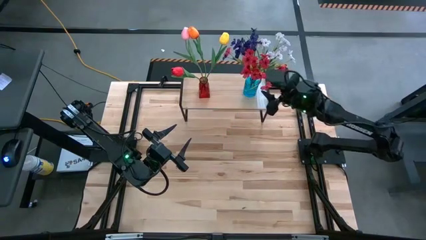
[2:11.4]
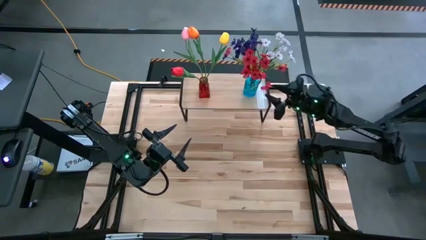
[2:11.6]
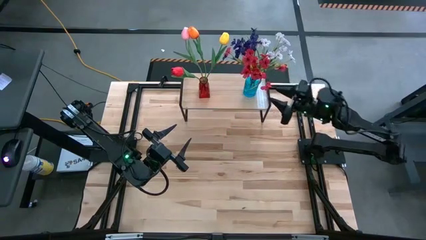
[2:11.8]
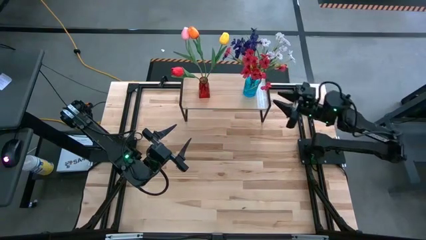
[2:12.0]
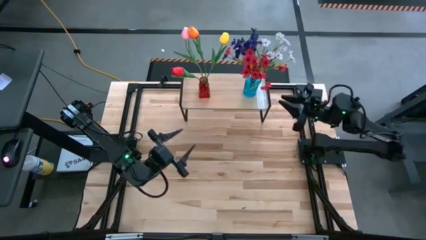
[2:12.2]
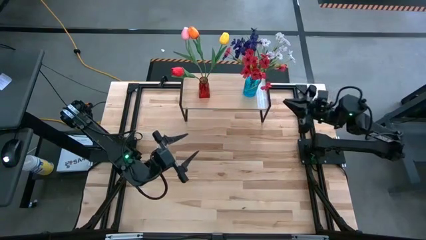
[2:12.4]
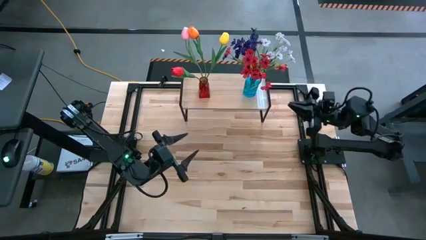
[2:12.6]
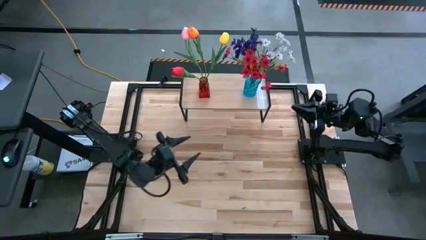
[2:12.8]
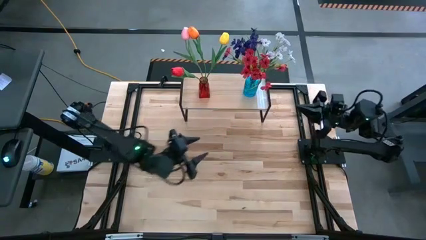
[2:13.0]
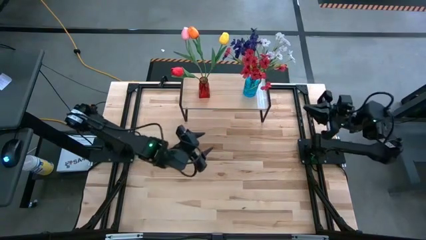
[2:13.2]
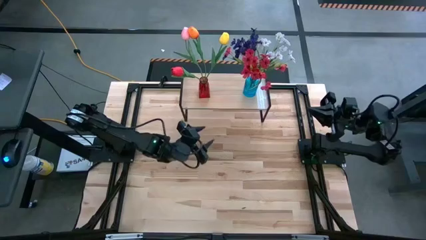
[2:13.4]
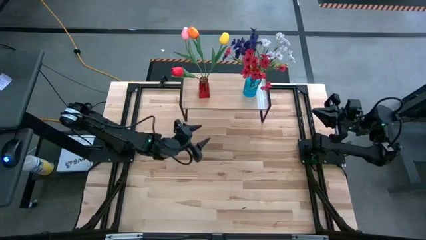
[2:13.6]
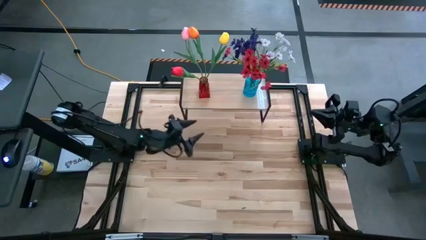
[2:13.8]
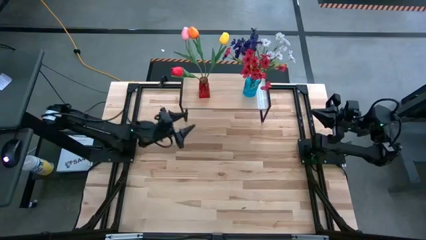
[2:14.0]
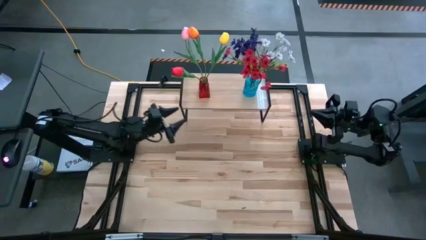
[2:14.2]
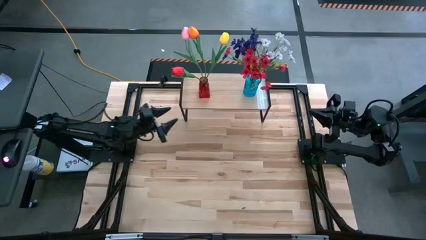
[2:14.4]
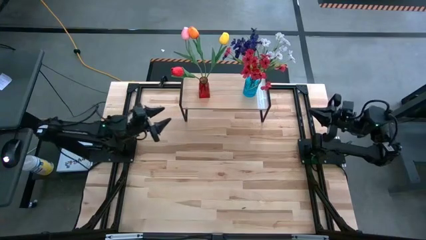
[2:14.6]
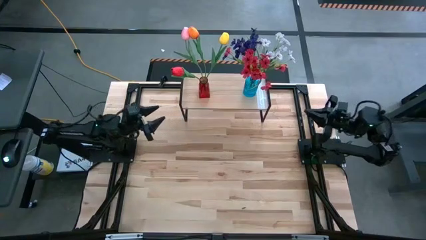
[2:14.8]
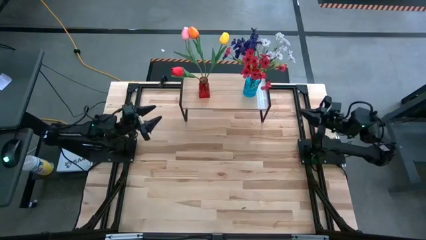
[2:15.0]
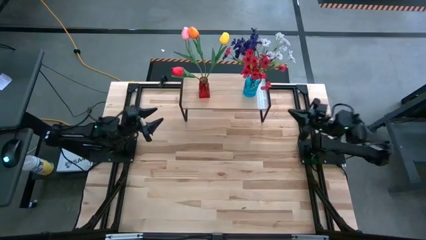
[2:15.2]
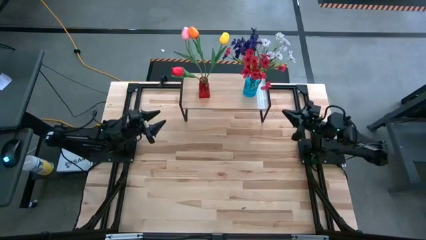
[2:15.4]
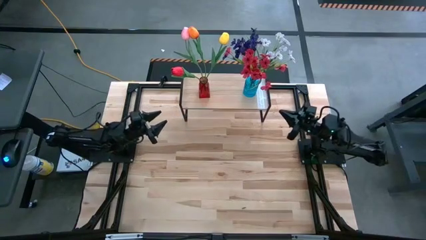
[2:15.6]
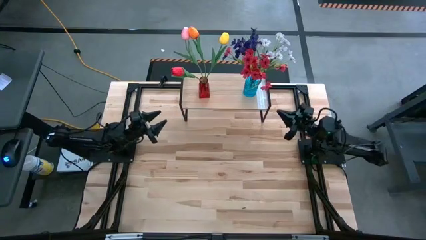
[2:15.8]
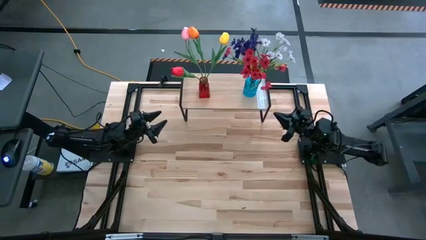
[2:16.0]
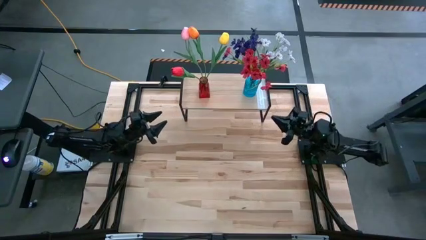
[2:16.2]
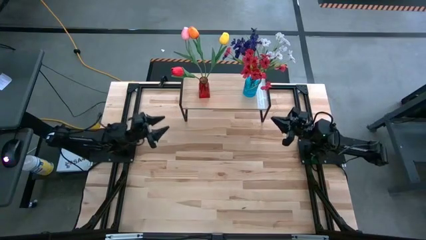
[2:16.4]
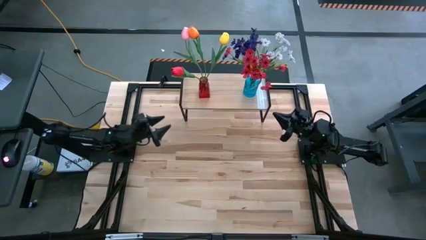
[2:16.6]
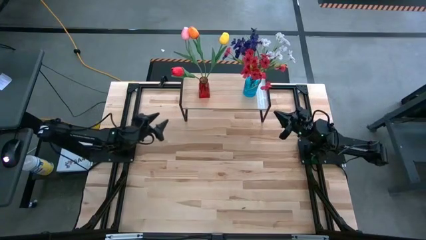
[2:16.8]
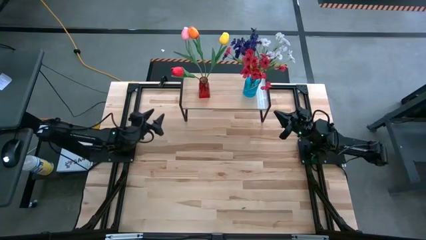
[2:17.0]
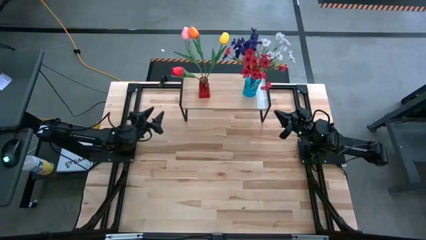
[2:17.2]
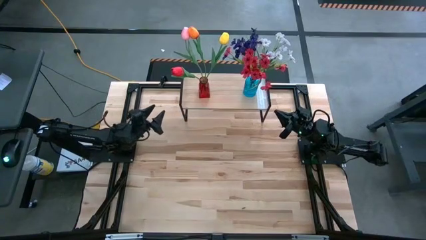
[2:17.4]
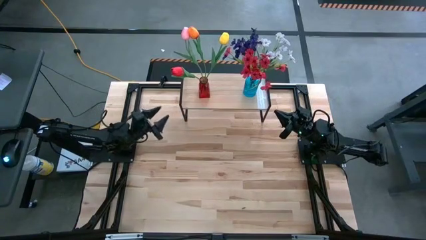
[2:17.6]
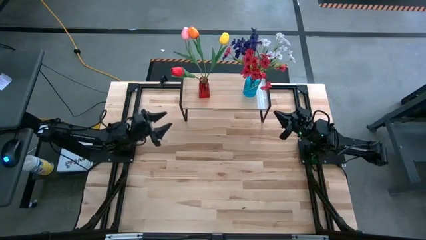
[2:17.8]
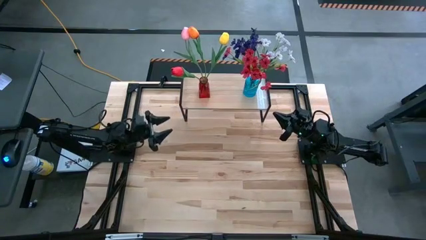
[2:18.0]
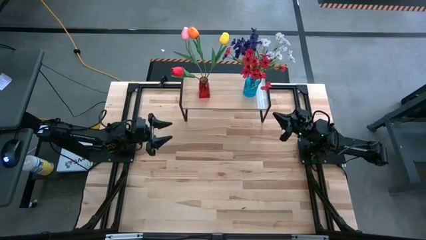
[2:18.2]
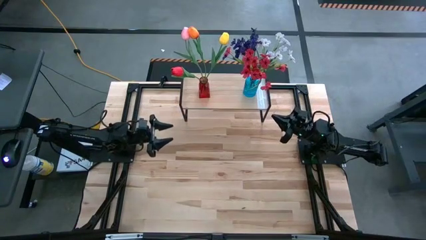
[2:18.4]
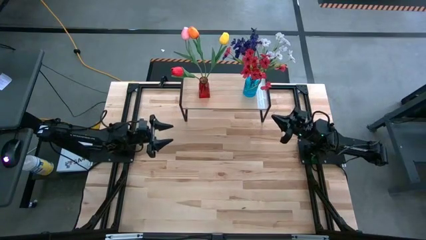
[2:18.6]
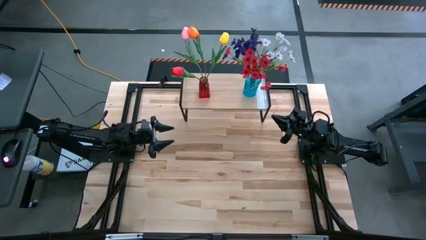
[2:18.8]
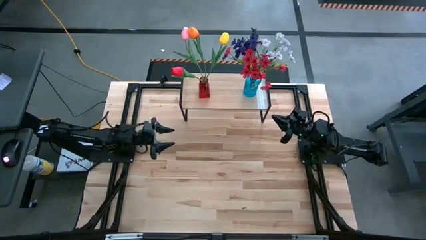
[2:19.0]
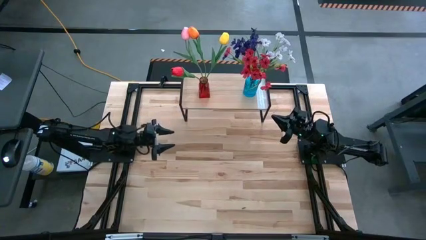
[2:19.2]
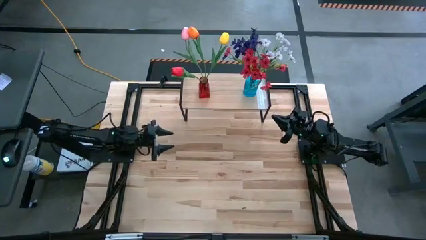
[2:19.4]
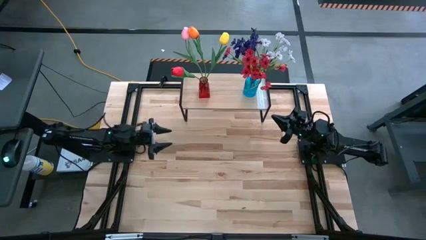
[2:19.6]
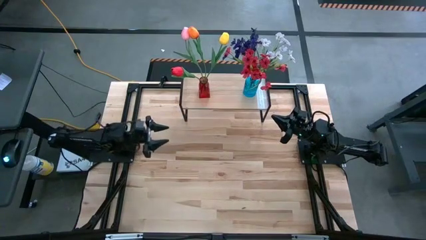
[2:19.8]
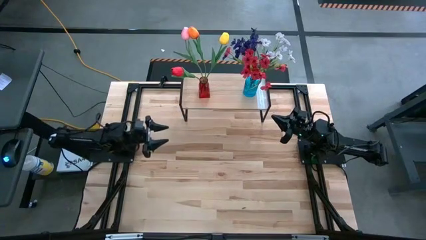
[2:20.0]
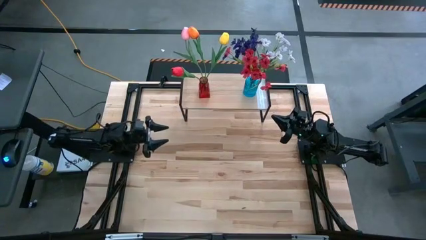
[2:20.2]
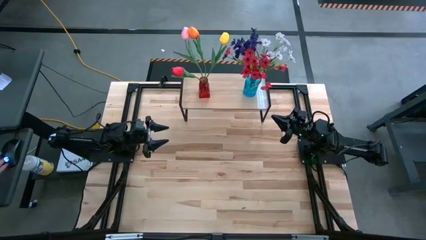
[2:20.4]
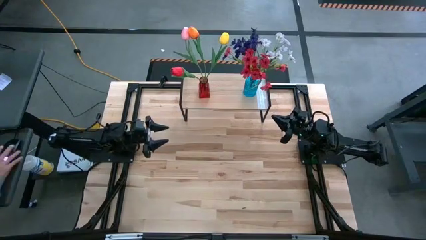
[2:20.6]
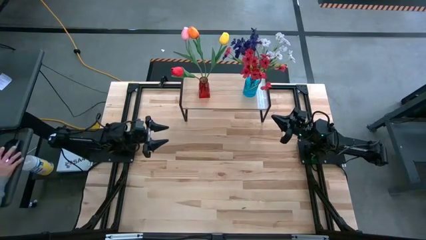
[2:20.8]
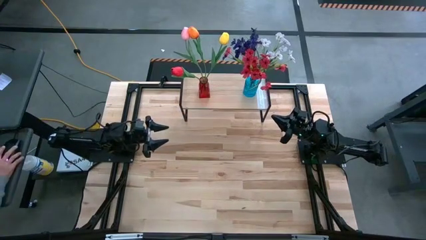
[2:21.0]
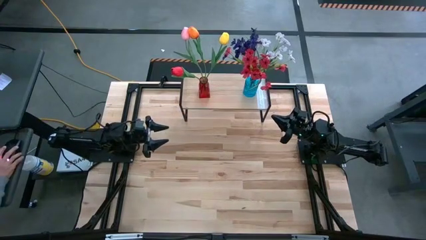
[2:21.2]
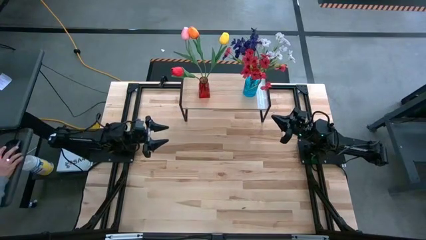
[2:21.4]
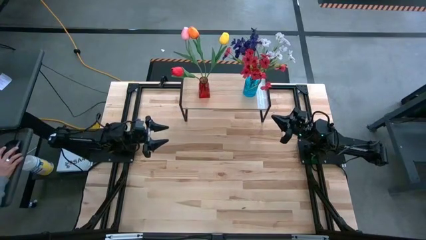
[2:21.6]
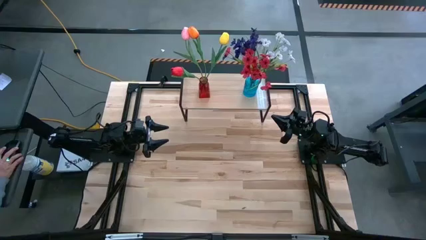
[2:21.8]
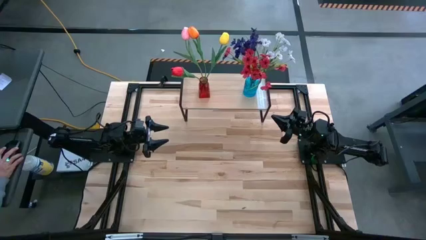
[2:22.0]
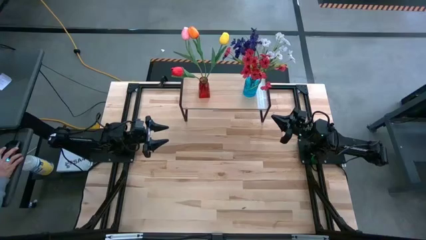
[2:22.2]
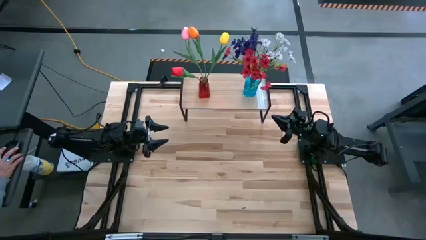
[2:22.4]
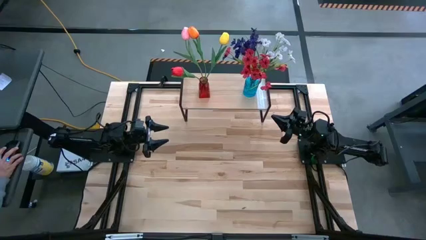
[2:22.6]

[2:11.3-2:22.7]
Task: Pick and place flowers into a vace then onto a shelf
Return to Home Position
